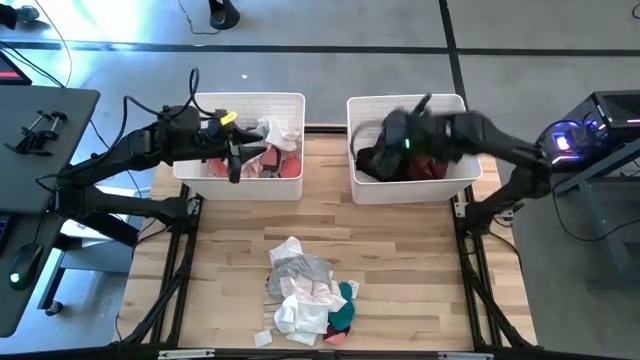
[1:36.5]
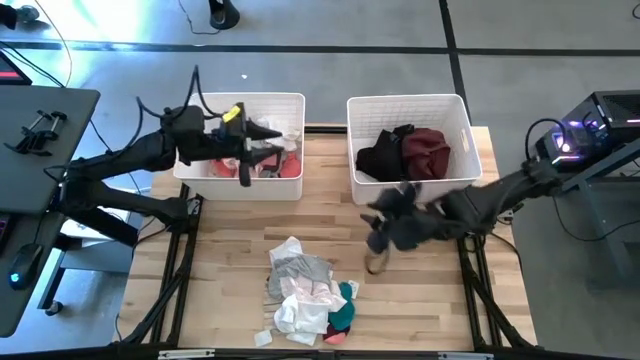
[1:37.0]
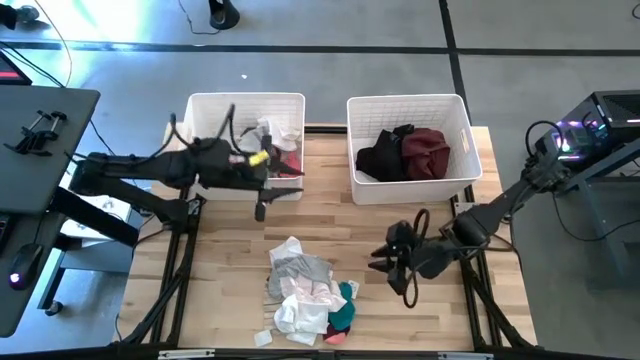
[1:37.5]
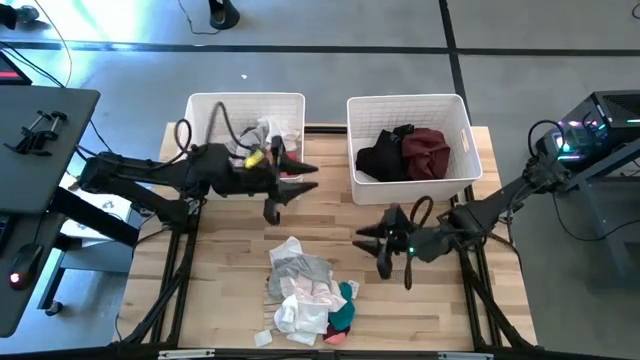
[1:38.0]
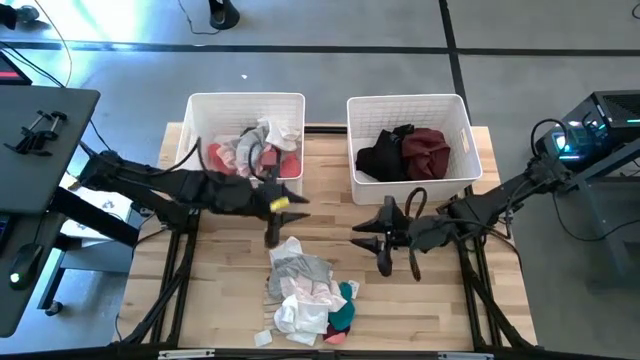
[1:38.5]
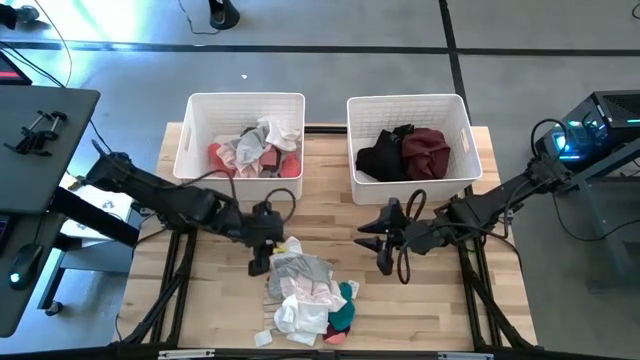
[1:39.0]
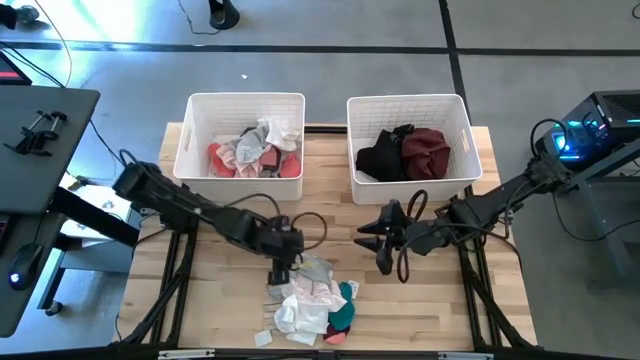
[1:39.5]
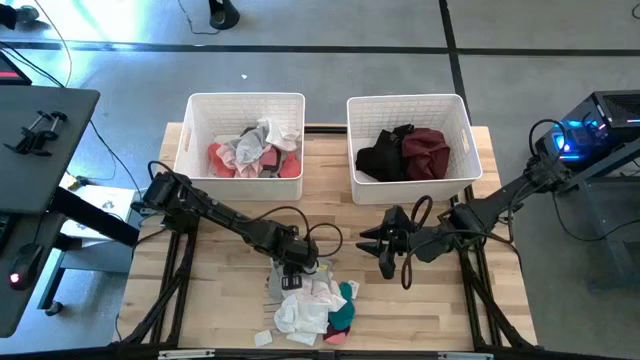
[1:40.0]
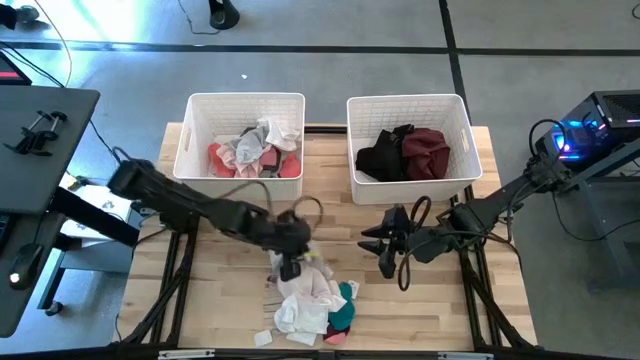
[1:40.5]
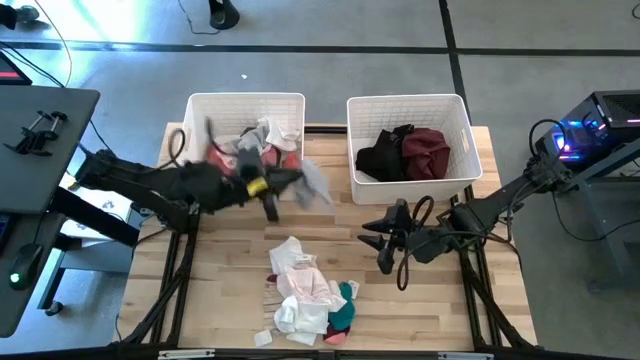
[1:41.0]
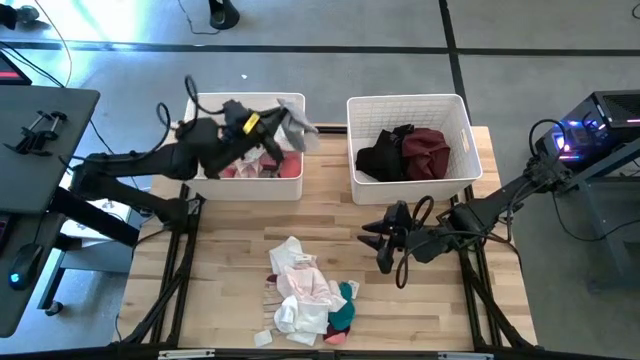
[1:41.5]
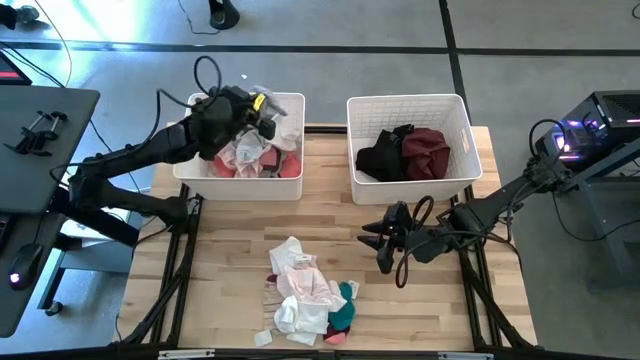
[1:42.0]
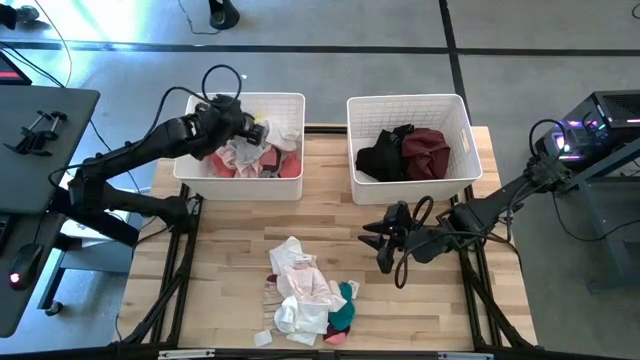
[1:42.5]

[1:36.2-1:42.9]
Task: Sort clothes
Put the gray sock into the left white laundry bin

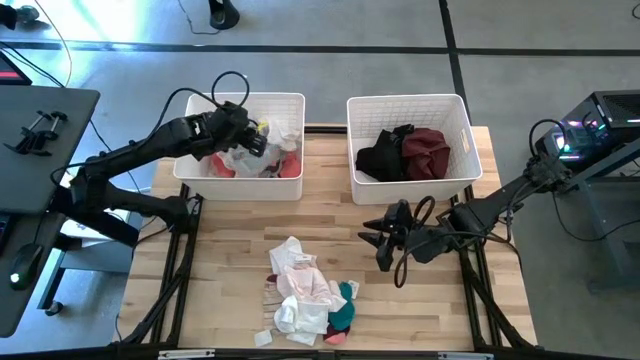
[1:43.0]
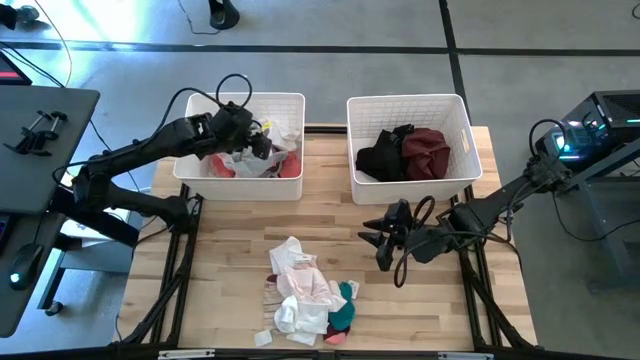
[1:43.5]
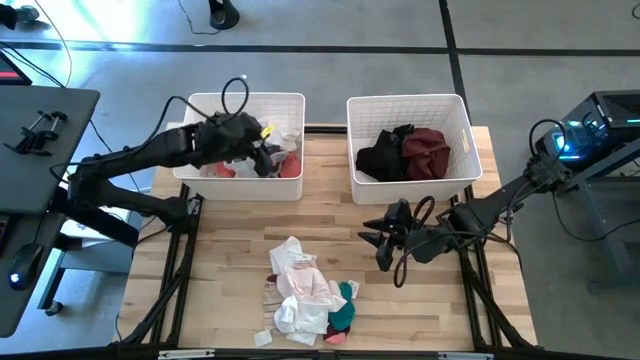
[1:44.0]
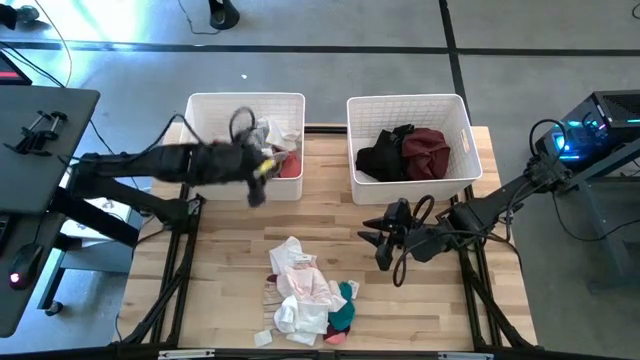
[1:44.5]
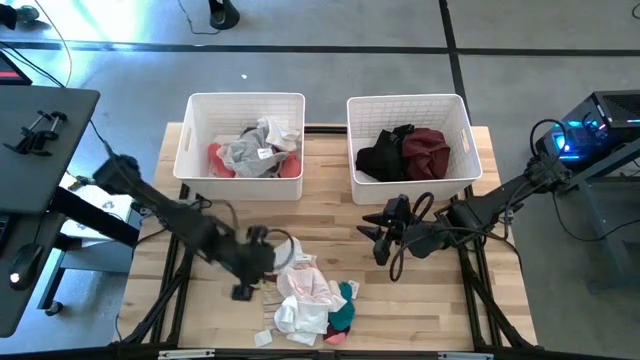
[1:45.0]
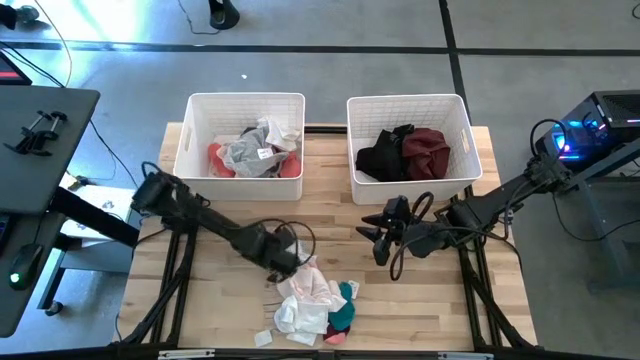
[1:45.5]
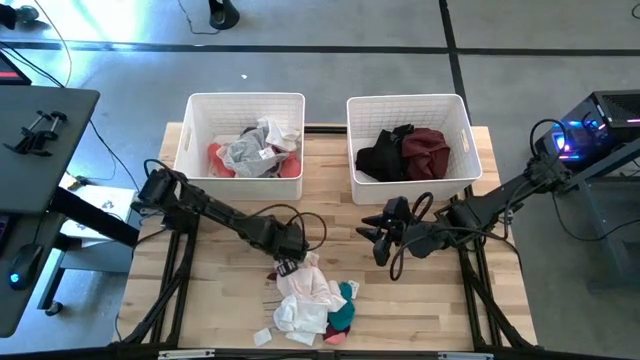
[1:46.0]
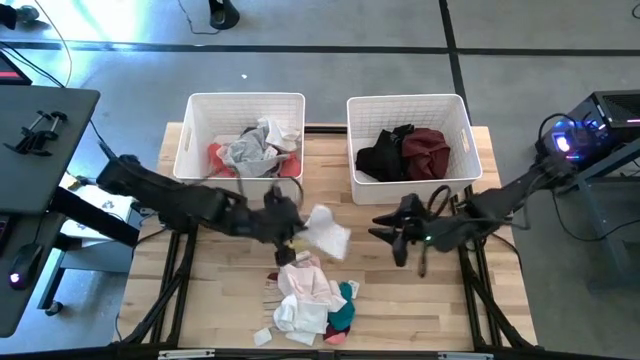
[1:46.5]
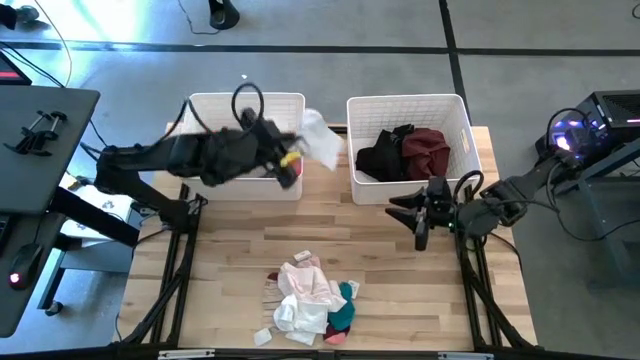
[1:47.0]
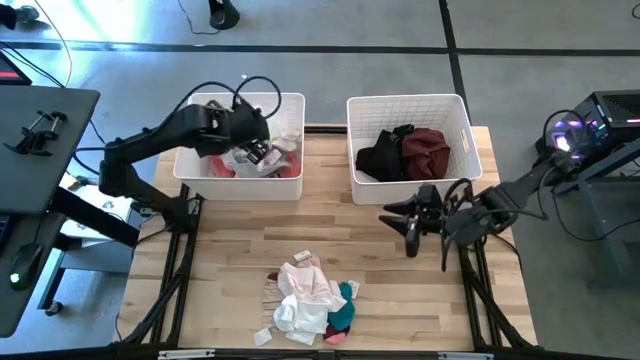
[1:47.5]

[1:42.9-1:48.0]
Put the white sock into the left white laundry bin

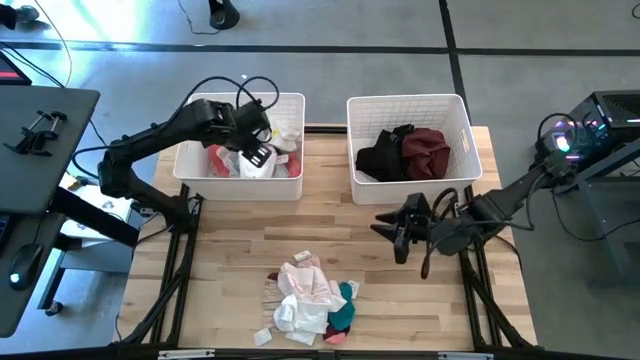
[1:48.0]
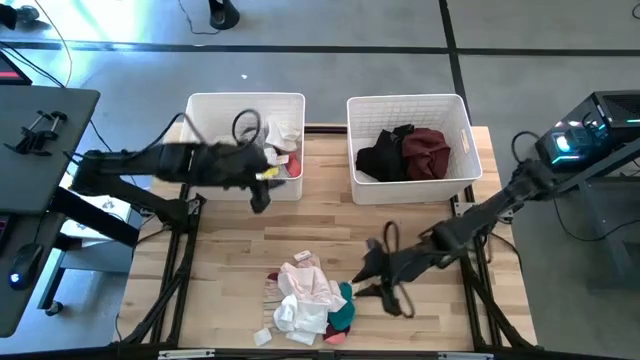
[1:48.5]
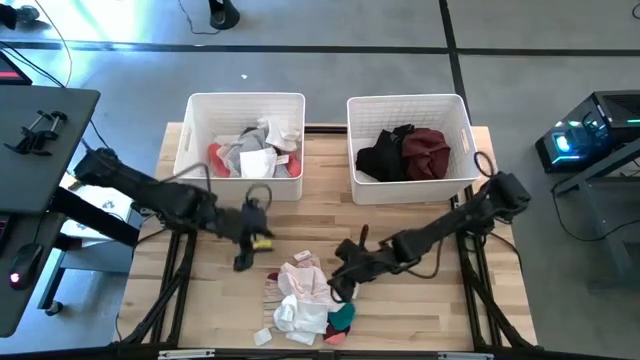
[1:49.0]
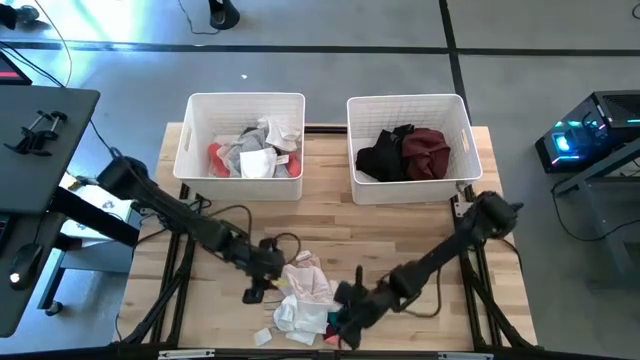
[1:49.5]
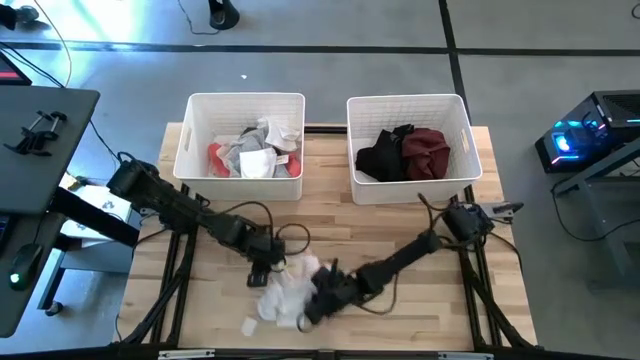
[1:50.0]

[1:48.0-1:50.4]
Adjust the underwear and socks on the center table

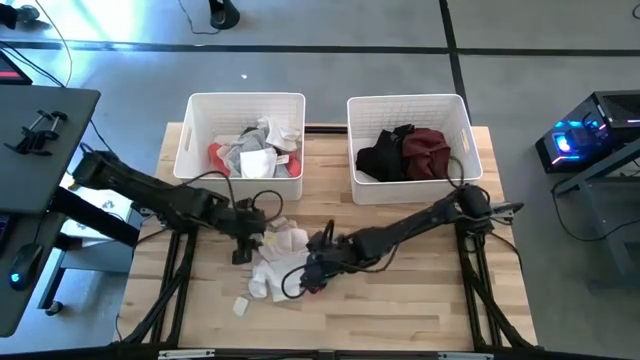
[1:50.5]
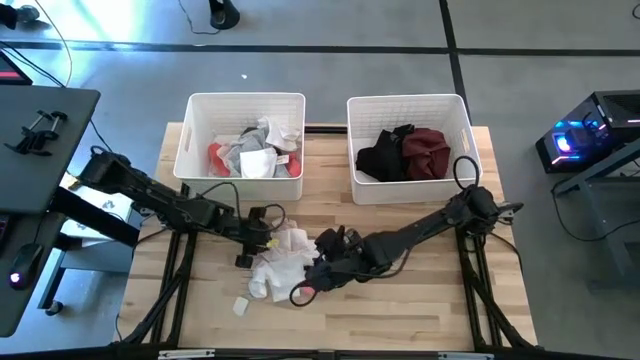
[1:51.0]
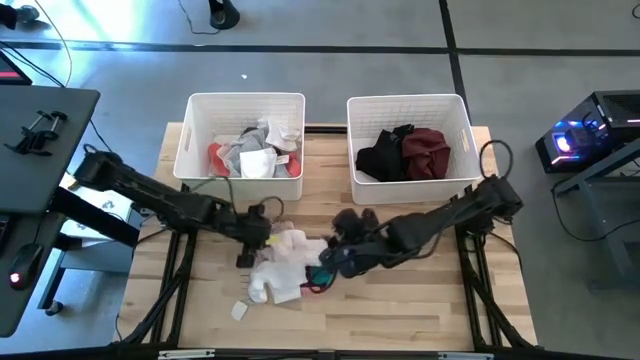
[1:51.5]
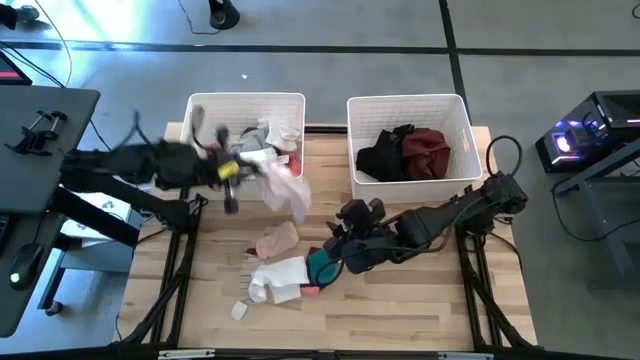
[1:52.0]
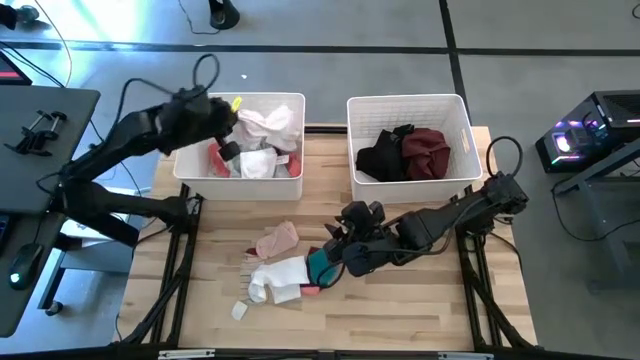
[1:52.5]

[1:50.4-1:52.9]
Put the light pink underwear into the left white laundry bin

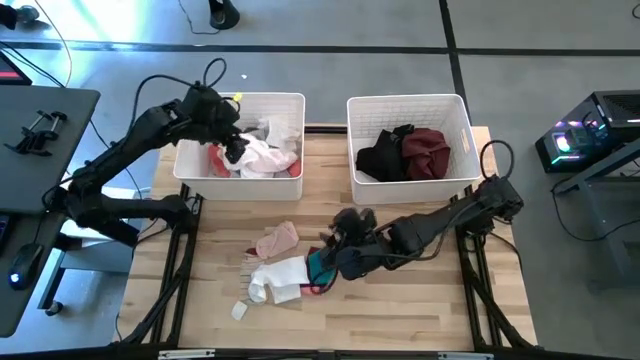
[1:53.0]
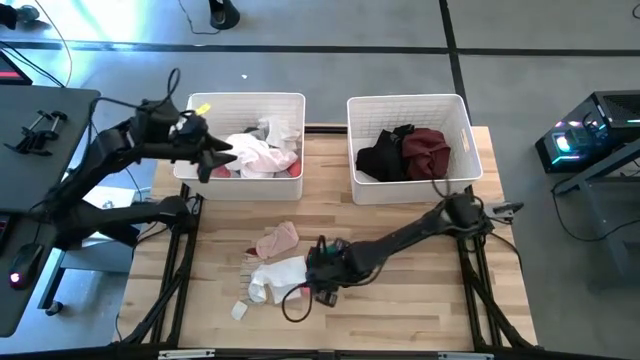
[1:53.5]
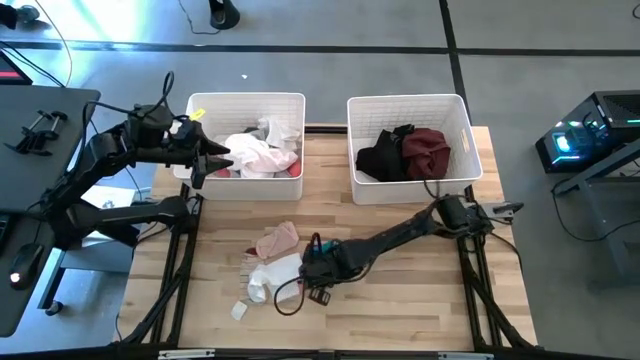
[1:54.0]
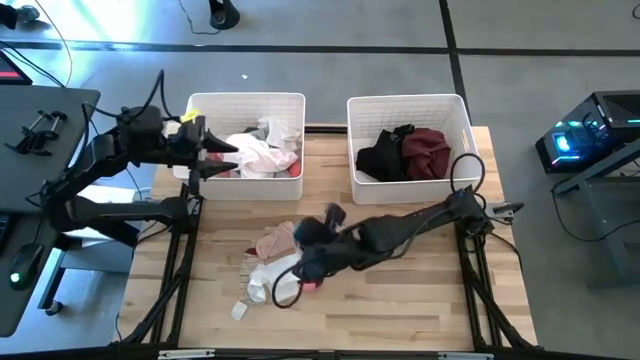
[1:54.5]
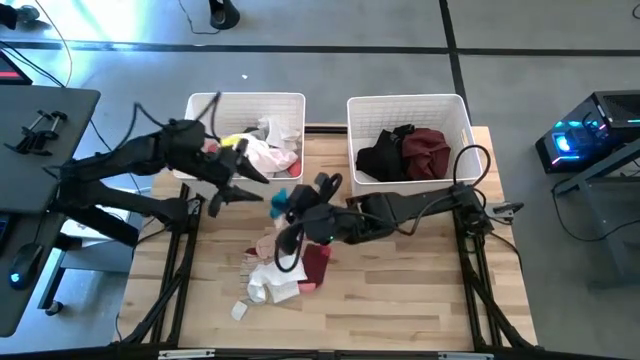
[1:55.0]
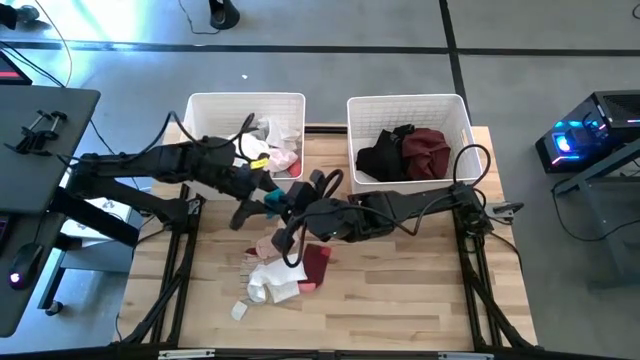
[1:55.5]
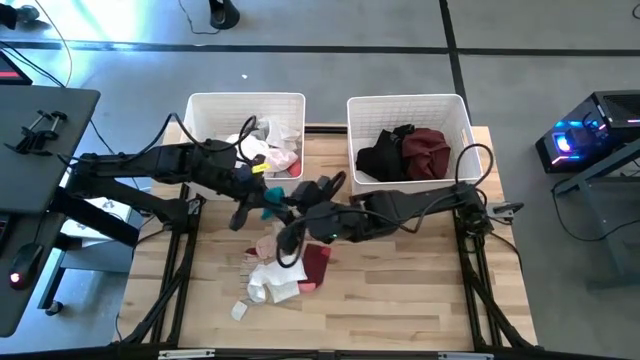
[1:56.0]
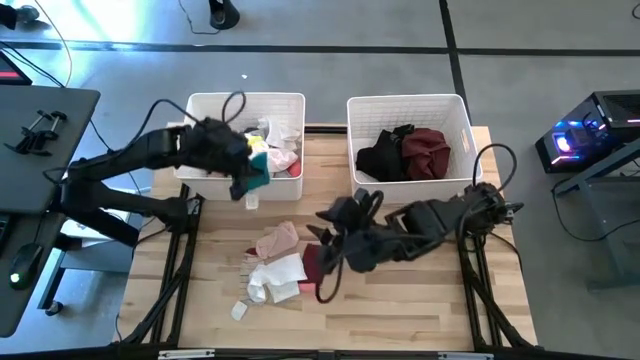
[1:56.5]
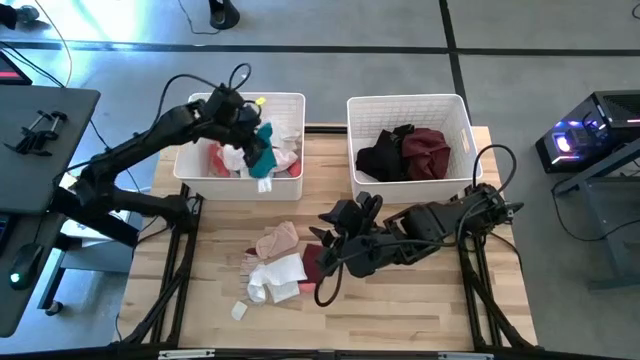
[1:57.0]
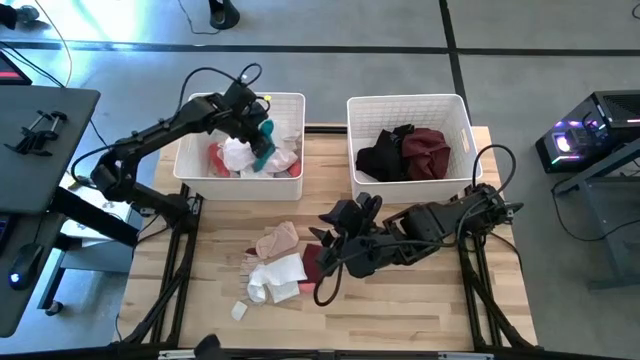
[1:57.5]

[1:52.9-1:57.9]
Put the blue sock into the left white laundry bin
